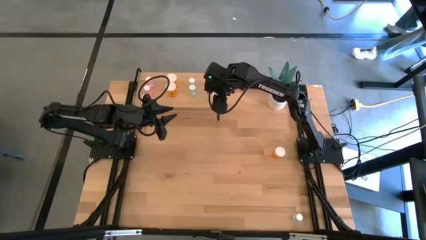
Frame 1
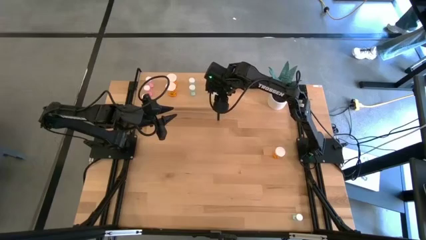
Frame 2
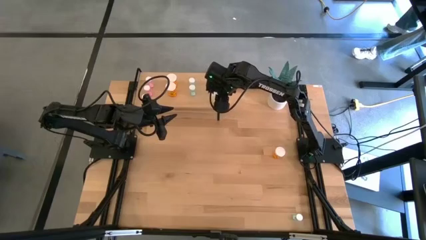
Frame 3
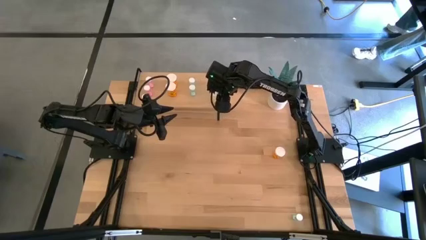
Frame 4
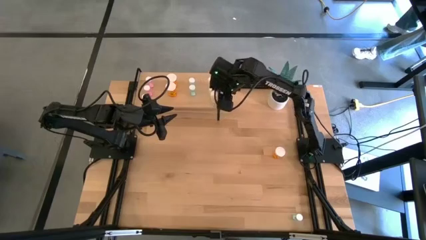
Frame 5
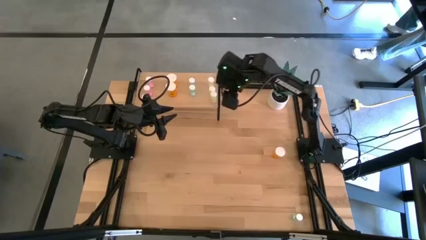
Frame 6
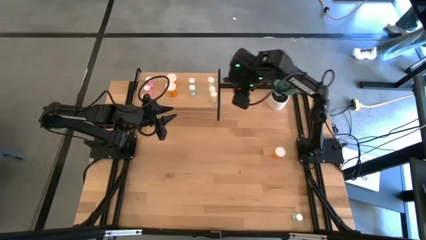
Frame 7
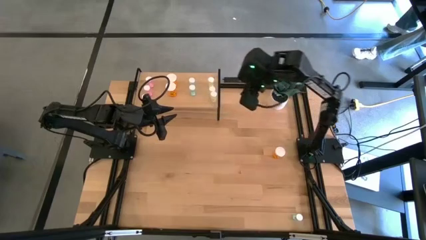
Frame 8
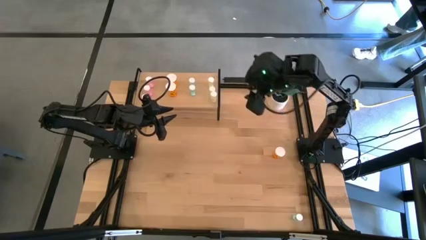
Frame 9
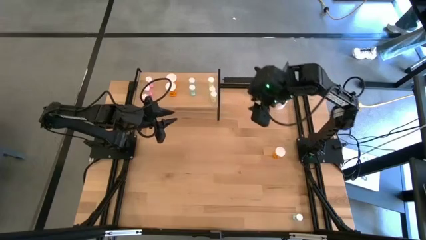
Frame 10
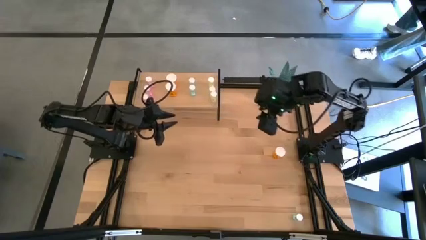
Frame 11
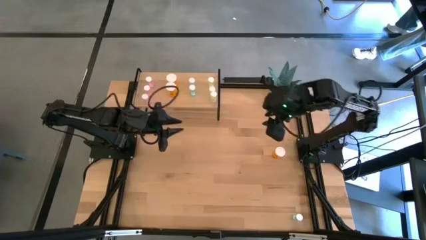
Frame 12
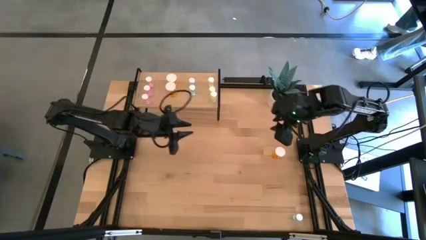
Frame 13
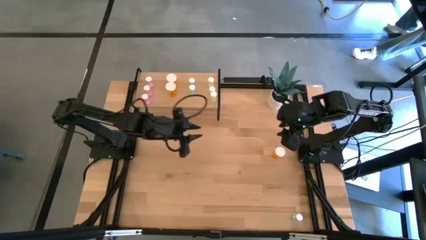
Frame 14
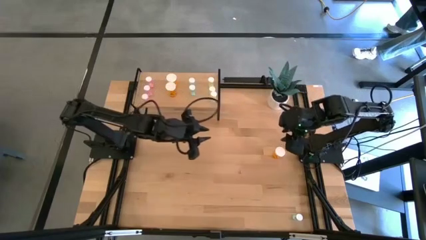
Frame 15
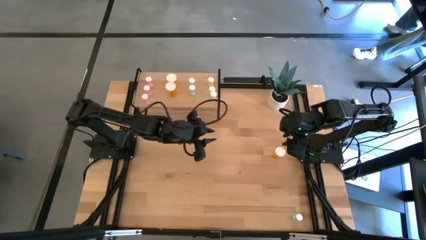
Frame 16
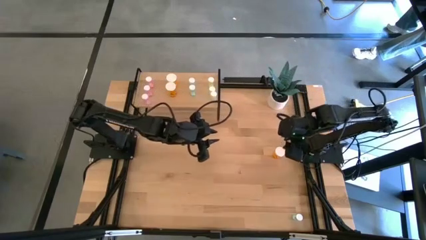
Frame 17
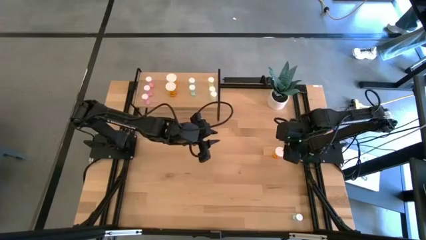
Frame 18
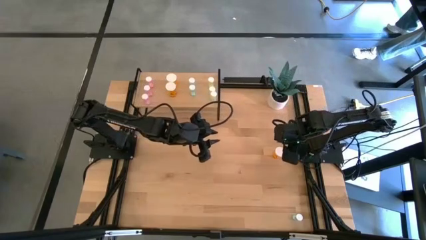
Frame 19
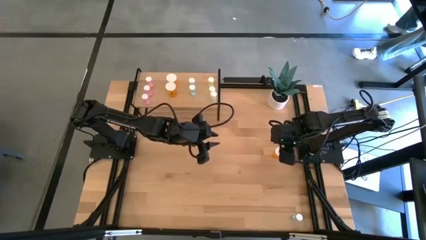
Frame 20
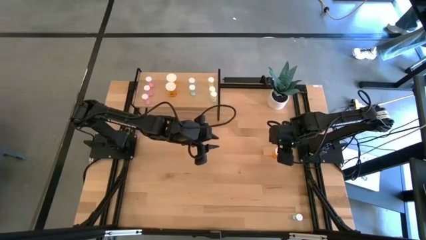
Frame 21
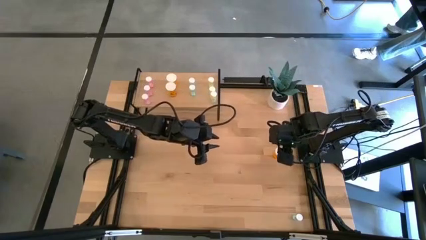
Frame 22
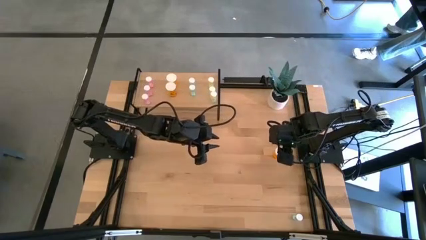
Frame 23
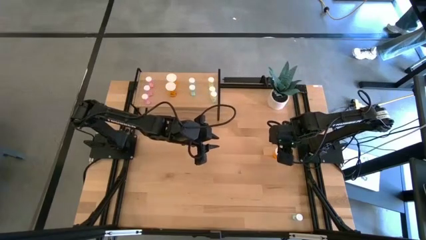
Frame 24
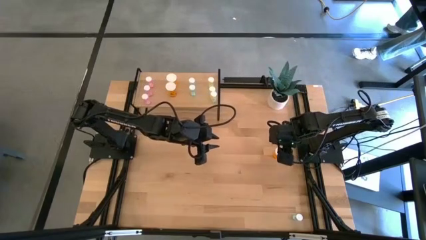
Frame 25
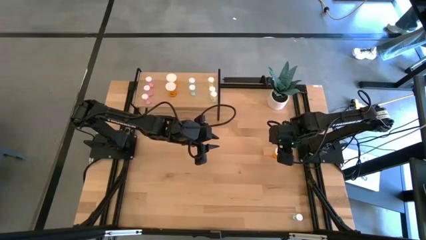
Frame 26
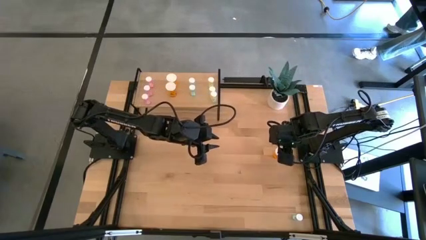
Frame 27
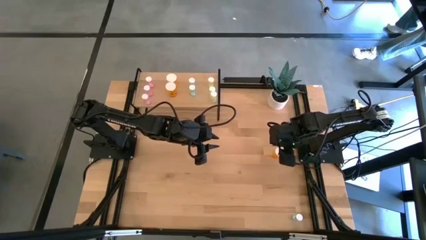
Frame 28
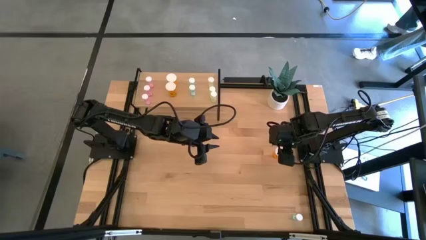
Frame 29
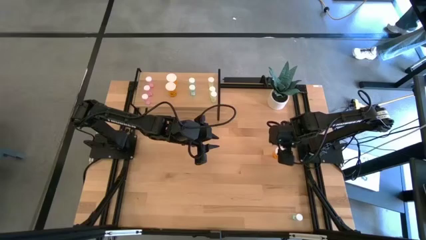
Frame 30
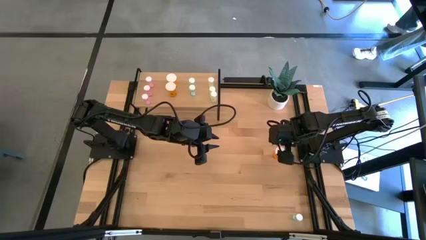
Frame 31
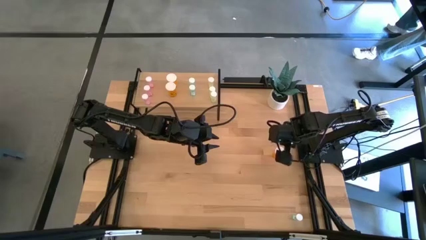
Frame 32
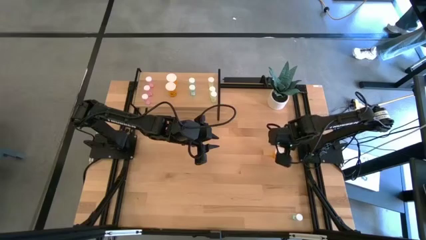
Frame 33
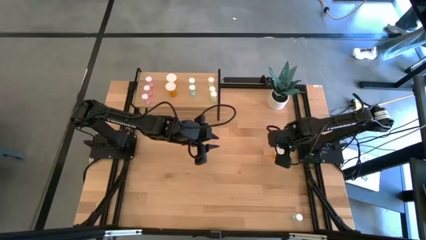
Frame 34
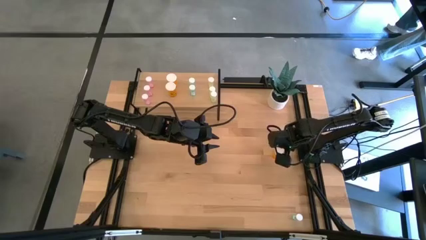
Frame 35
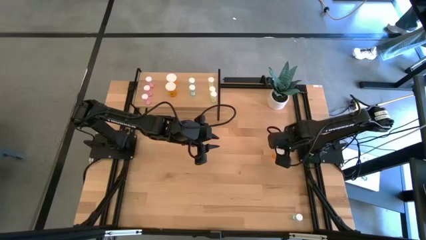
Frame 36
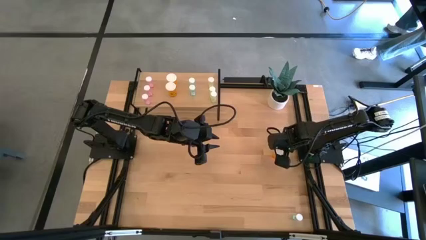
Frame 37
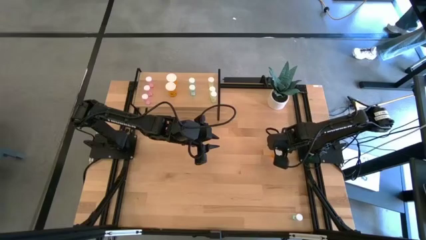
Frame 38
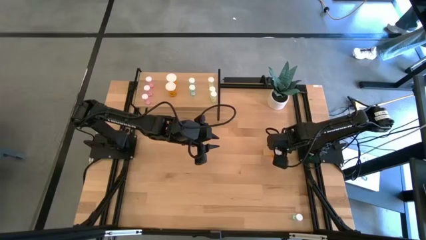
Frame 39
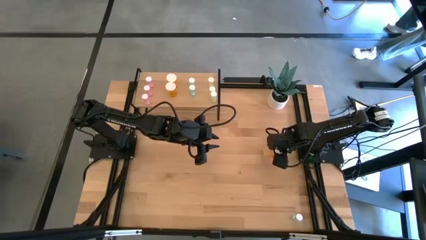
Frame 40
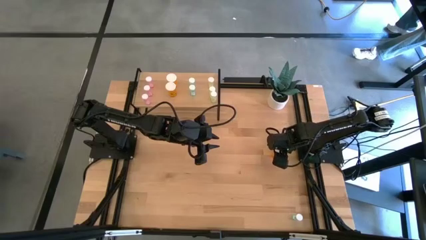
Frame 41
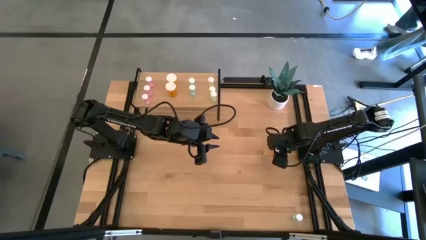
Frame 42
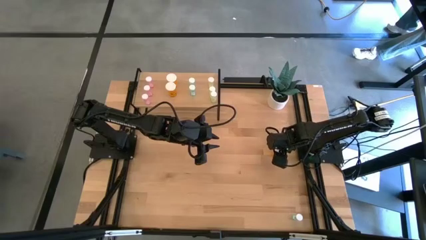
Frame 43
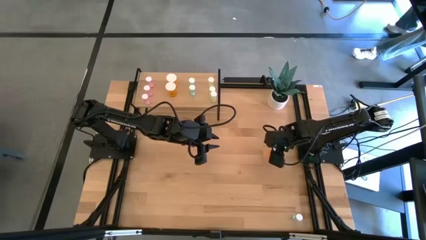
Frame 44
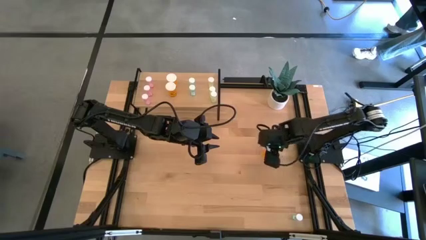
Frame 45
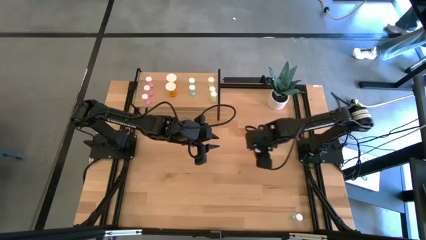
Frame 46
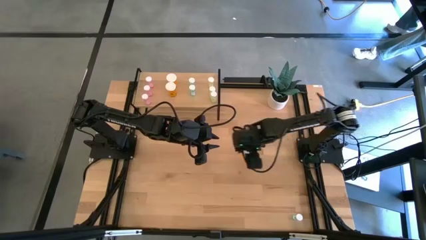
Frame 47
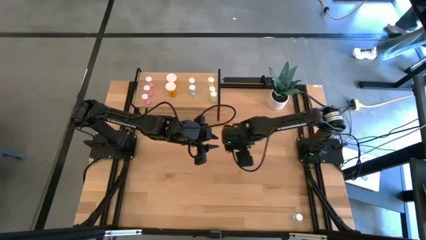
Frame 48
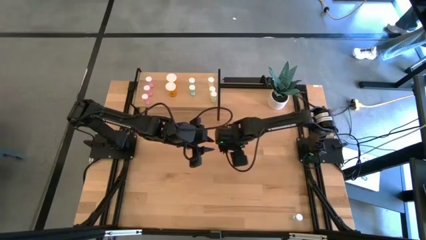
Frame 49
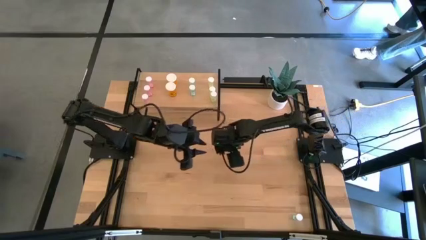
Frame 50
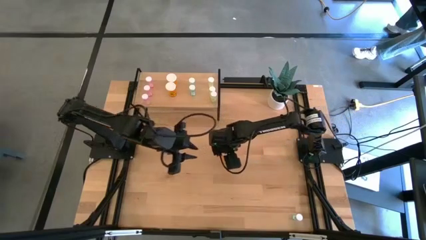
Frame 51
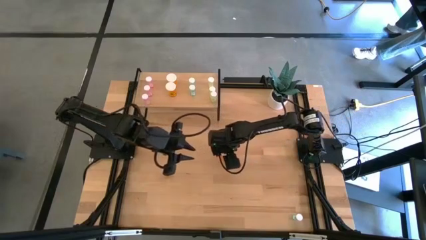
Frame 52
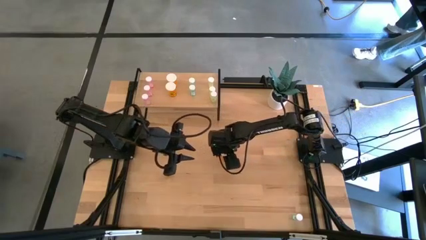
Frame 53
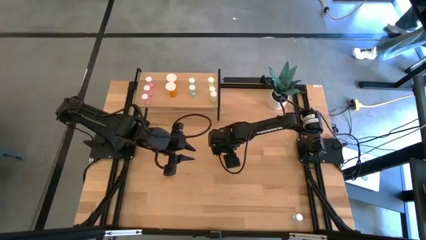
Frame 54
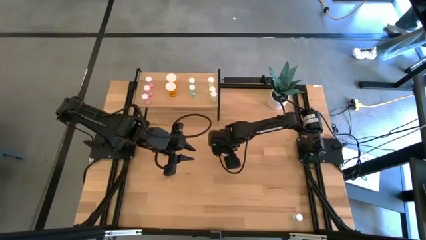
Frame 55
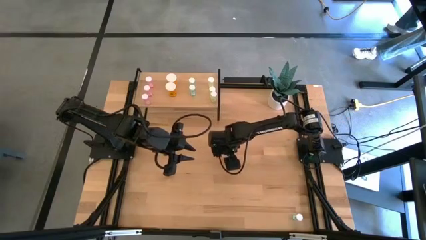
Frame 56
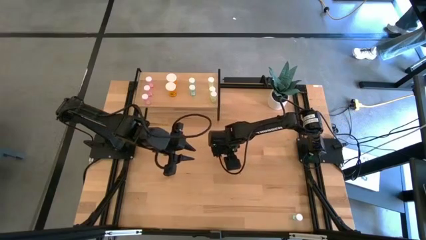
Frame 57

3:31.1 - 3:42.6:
Task: Pick and place medicine bottles onto shelf by color
Put the orange pill bottle on the shelf aligned with the other orange pill bottles
